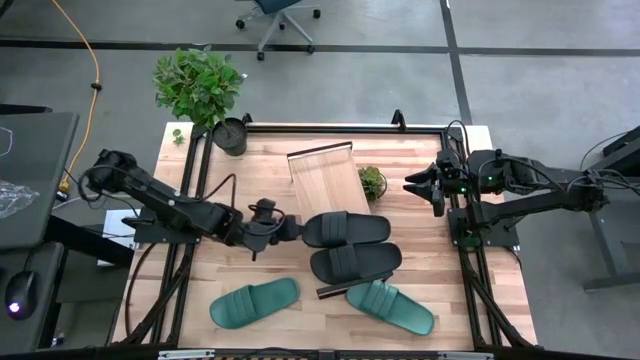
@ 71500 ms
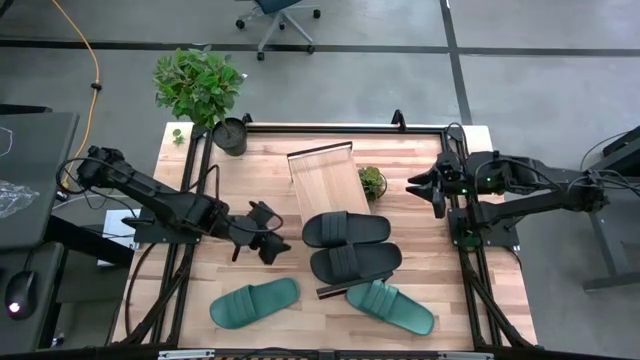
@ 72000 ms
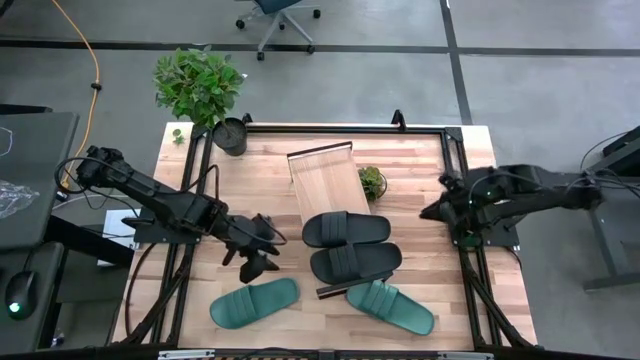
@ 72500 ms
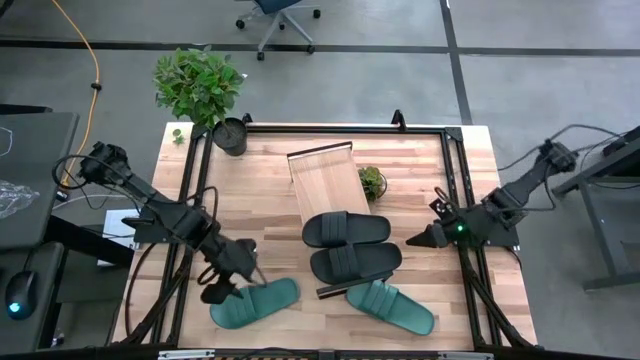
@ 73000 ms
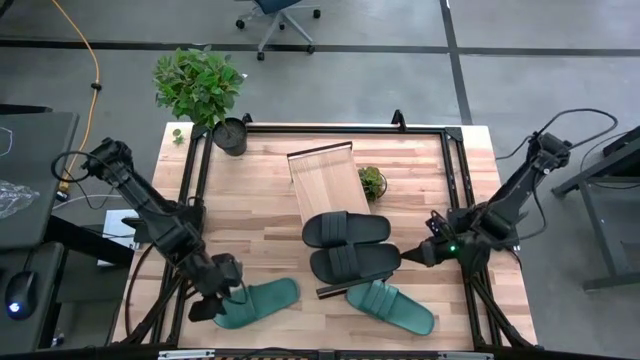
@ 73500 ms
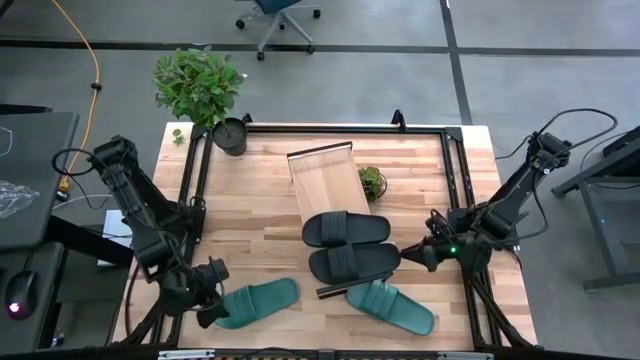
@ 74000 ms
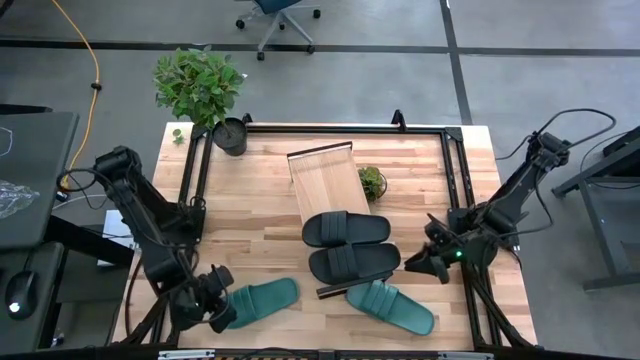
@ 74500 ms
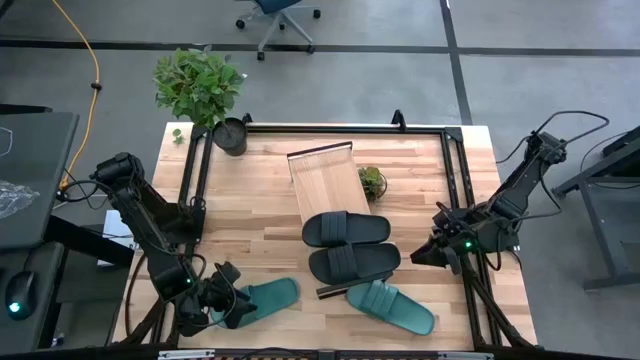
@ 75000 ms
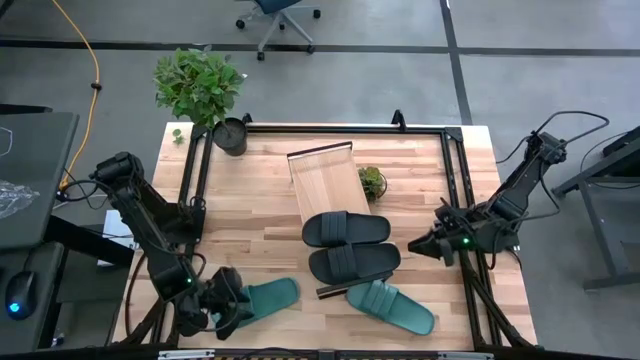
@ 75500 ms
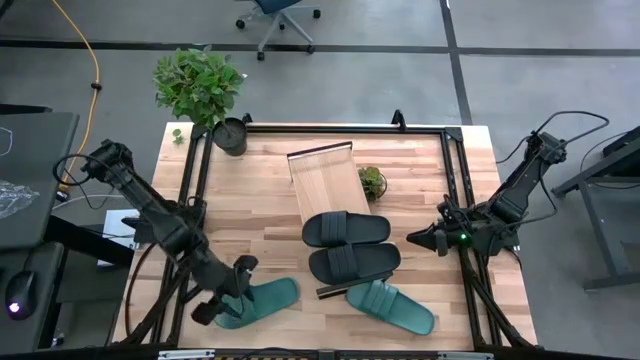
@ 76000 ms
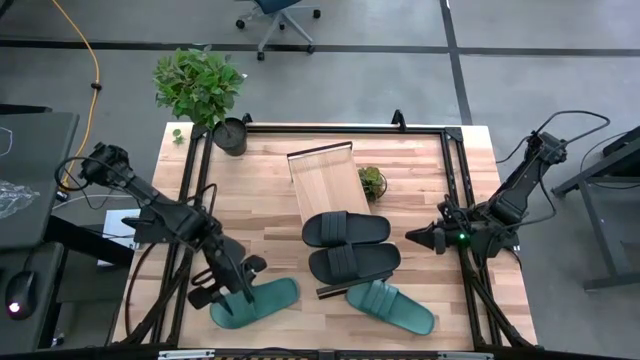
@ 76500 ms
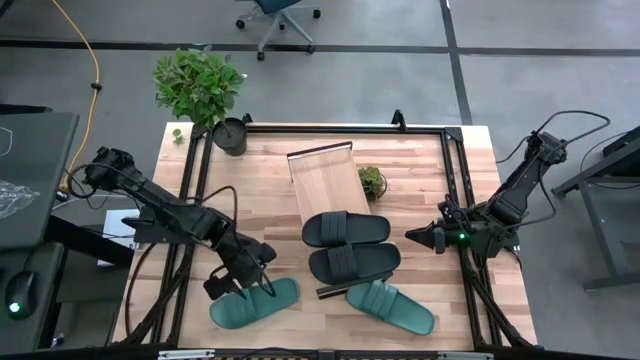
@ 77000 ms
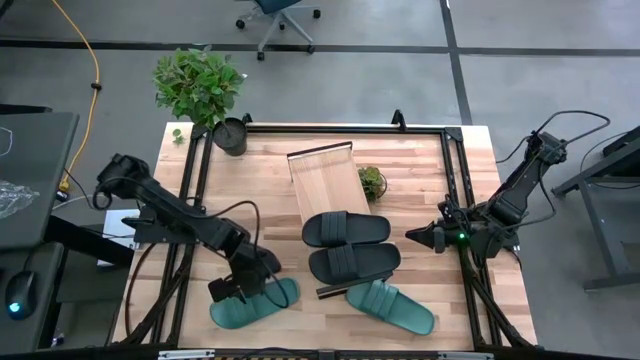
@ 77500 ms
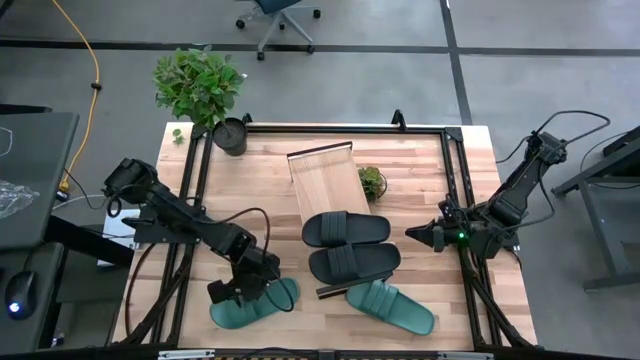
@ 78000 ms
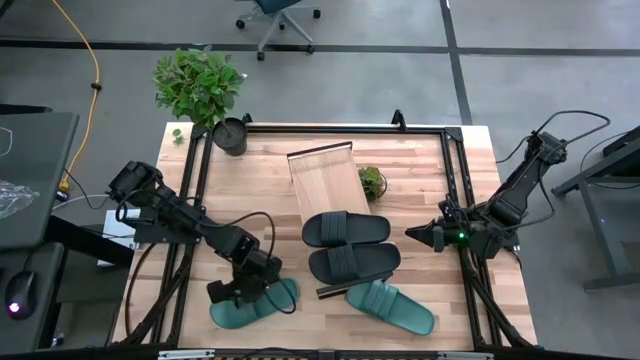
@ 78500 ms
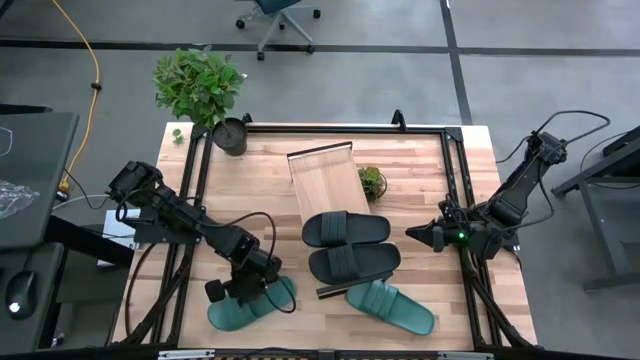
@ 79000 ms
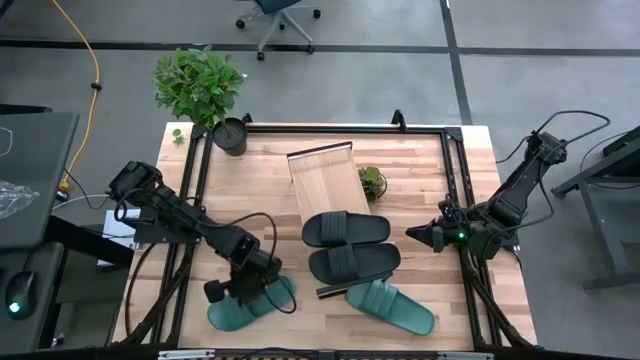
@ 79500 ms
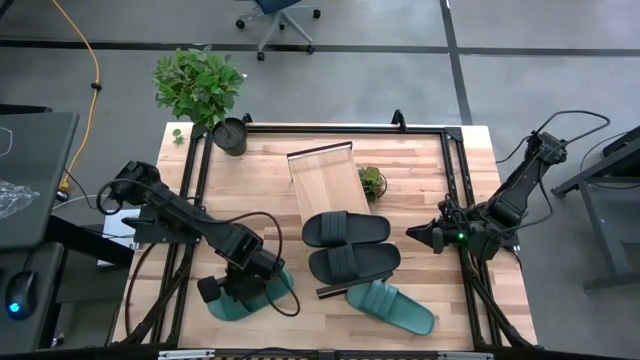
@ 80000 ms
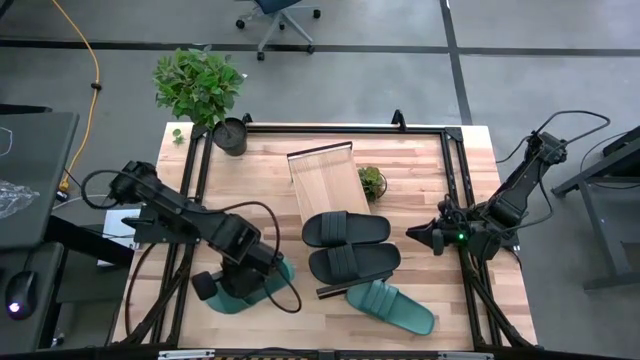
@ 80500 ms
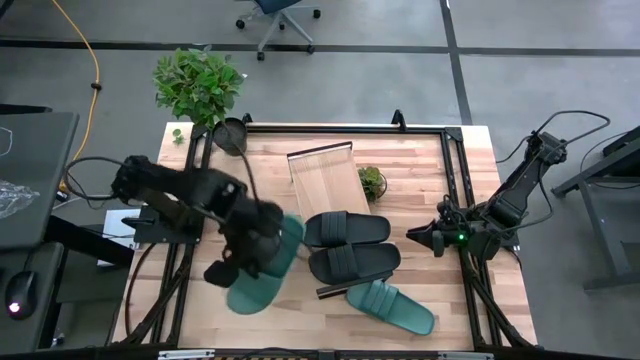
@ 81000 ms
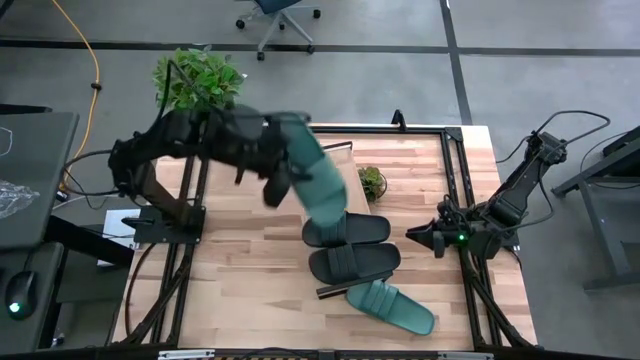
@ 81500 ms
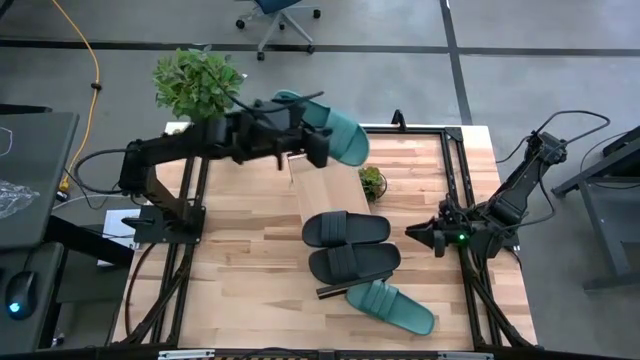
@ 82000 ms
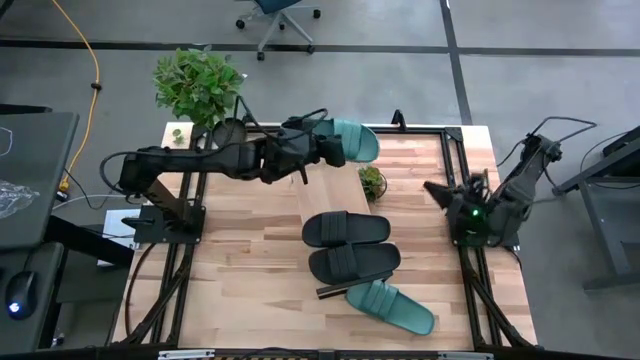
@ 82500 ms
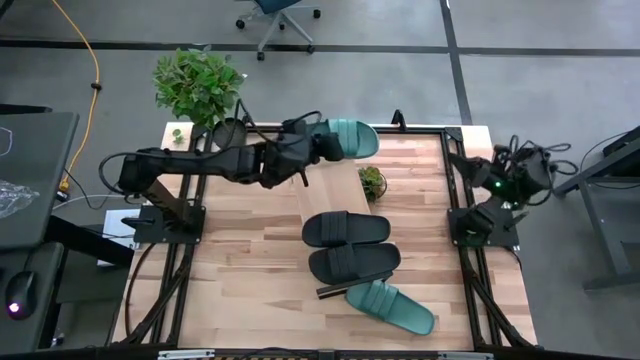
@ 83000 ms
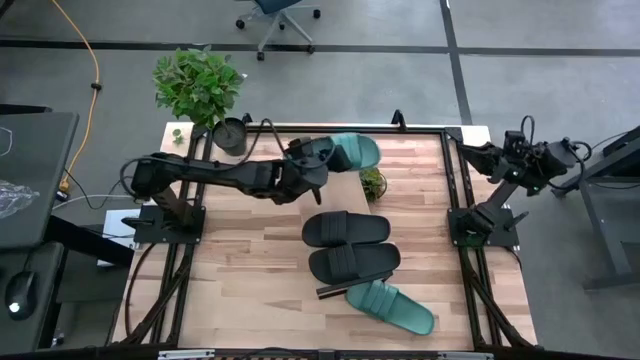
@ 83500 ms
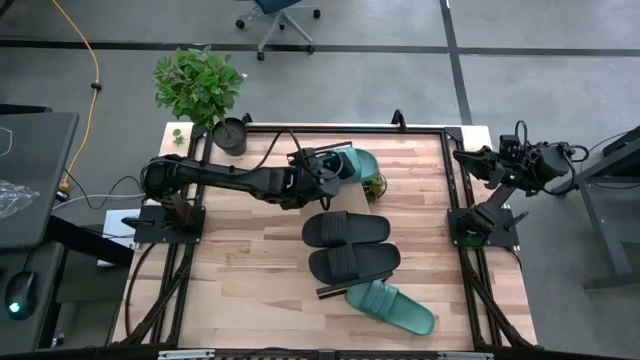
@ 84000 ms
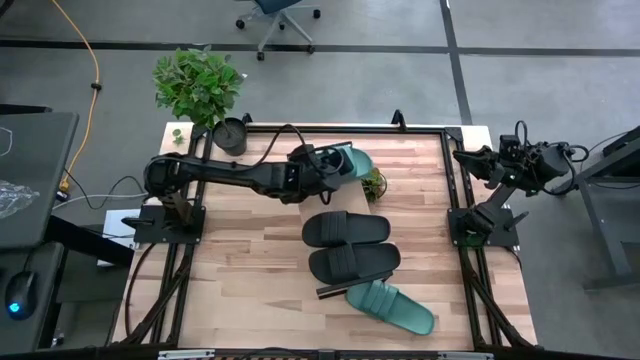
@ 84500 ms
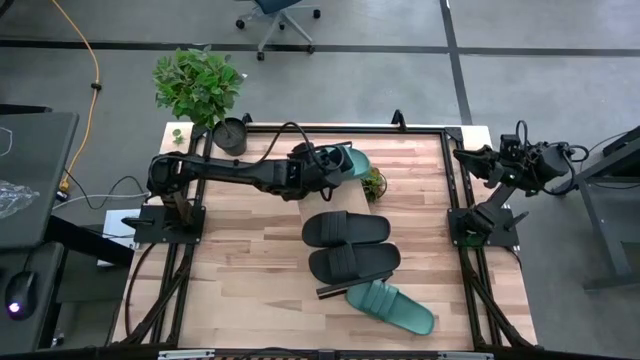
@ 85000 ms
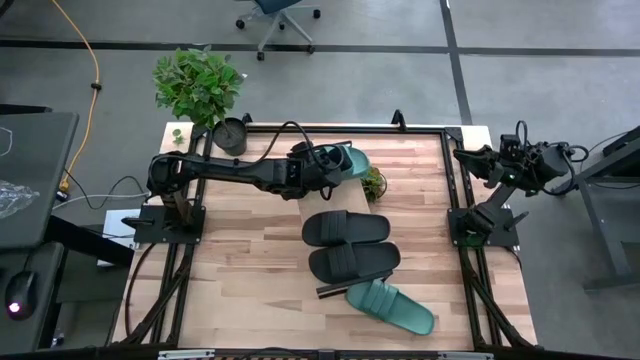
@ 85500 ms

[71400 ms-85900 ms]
Task: Pick and place slides into the shelf
Put the left green slipper on the shelf

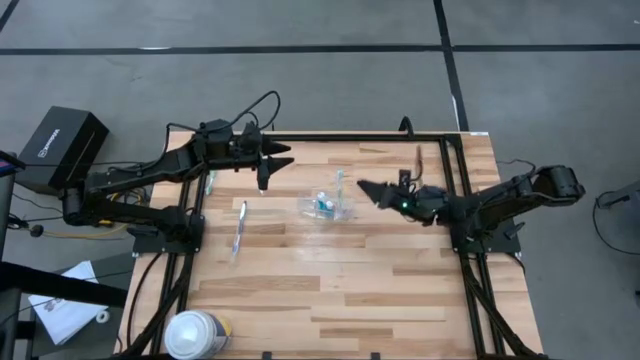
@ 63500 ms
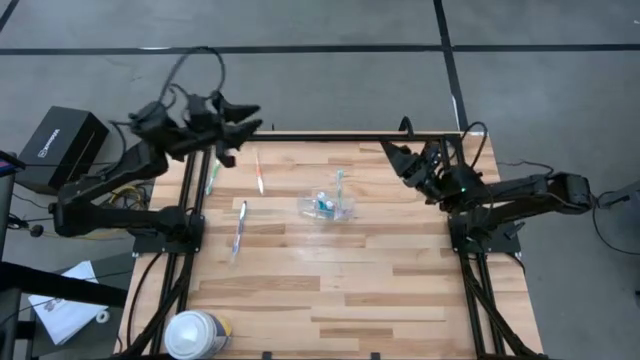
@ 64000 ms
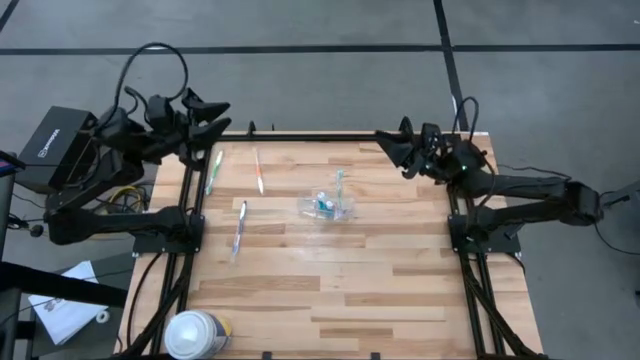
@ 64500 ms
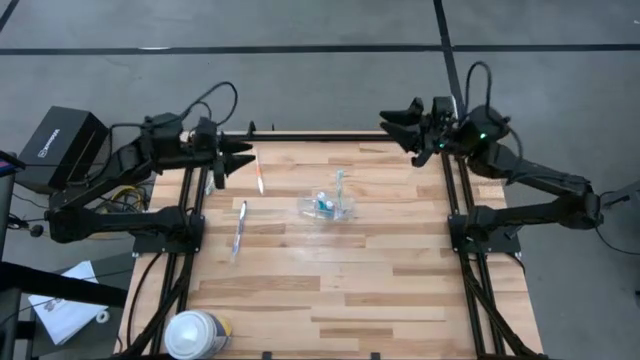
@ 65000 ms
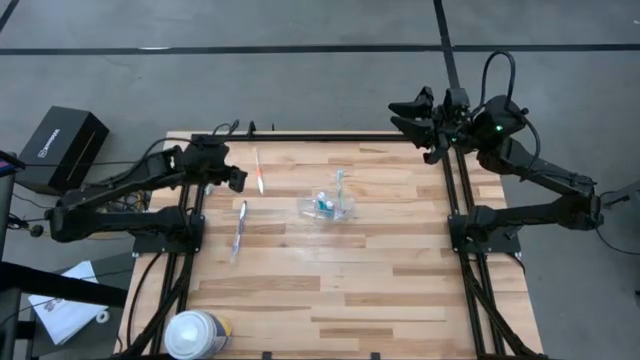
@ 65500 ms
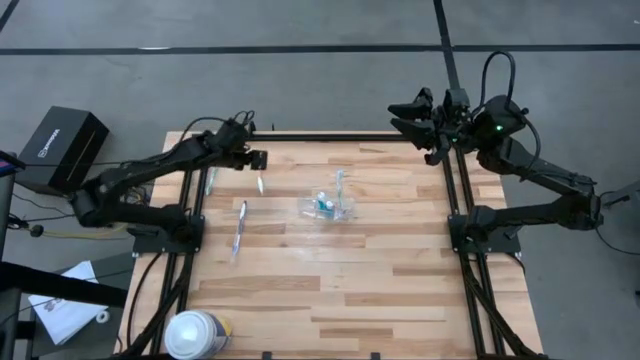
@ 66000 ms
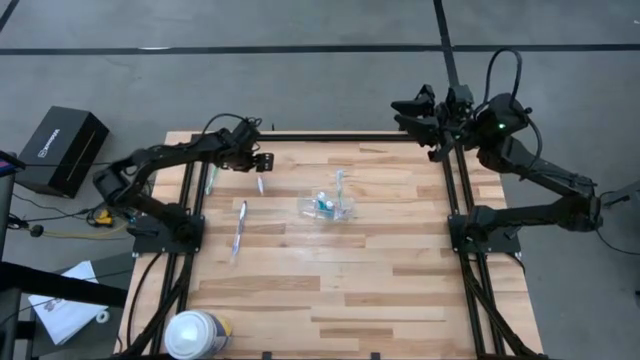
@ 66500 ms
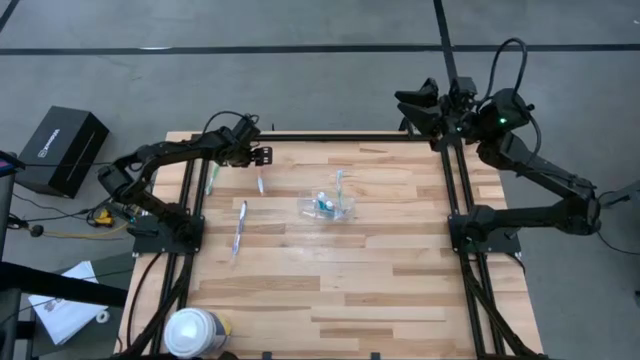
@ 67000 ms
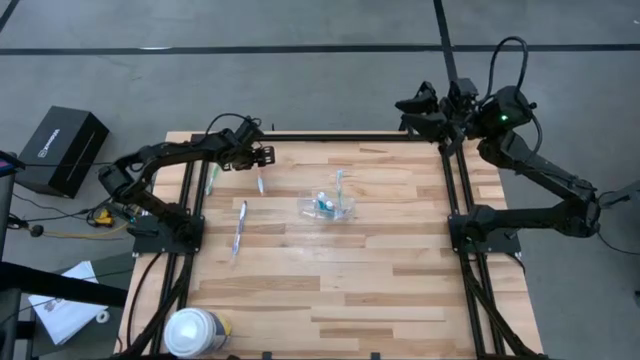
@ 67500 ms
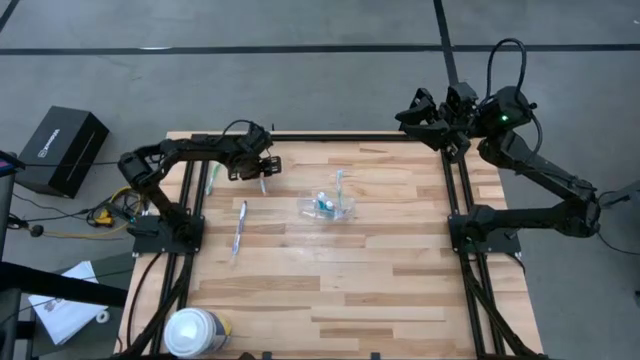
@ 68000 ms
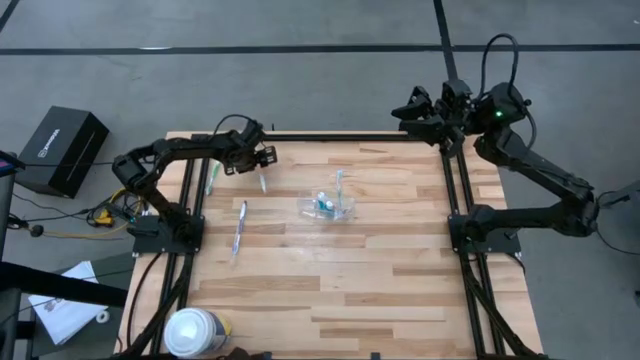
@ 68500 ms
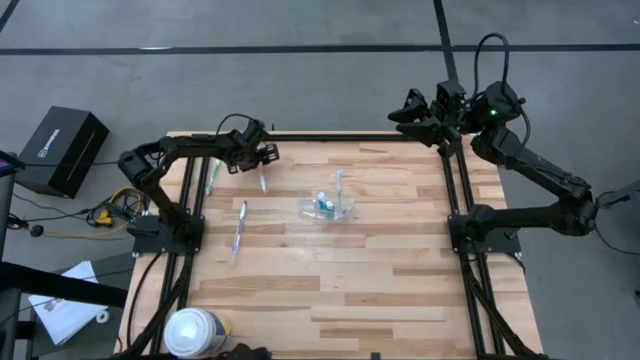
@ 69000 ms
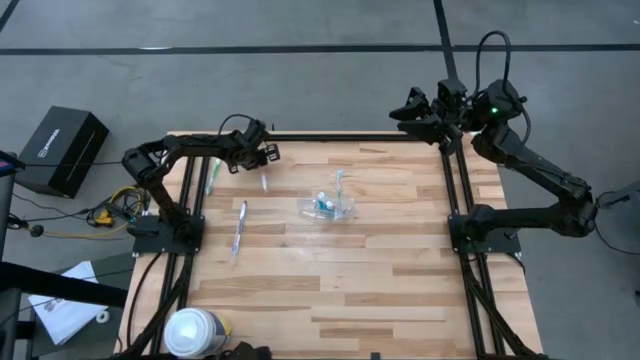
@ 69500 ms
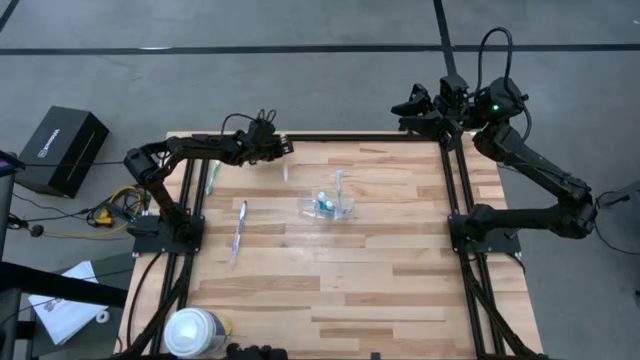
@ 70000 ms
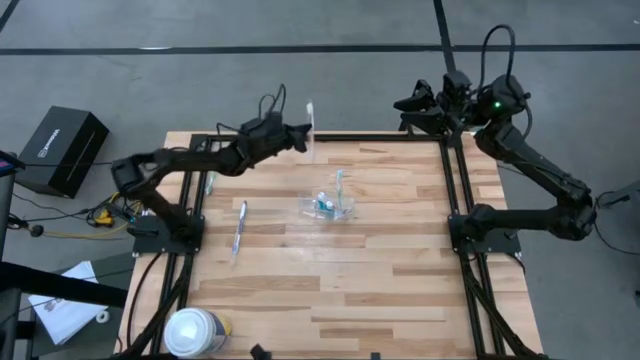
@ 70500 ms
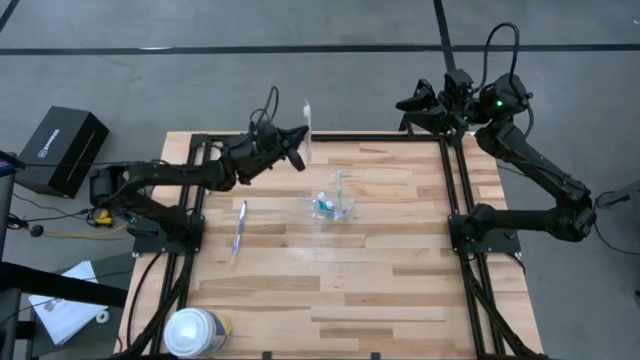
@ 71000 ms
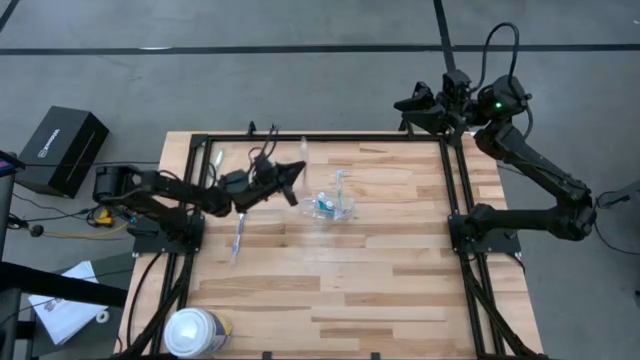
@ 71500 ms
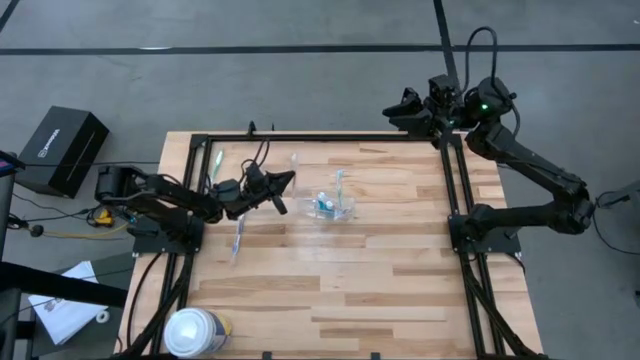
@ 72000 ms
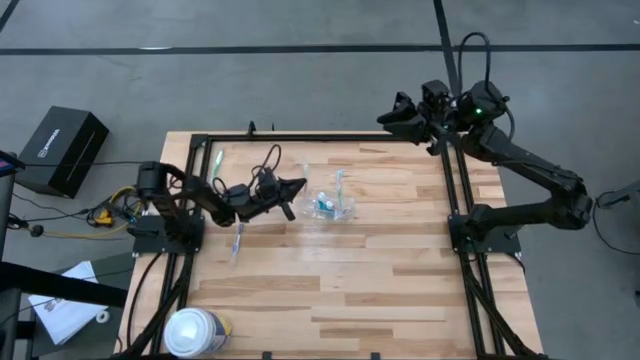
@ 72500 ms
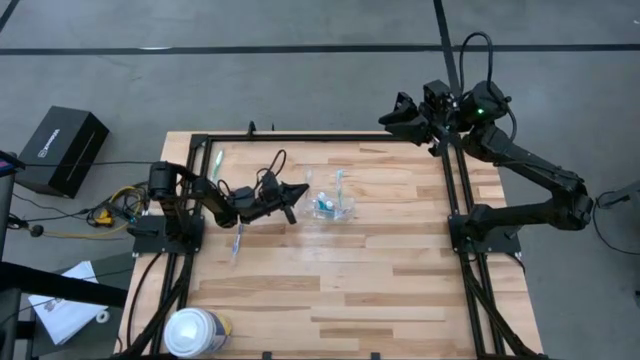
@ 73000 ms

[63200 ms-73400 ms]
Task: Pick & Place toothbrushing station
Put the orange toothbrush into the transparent organizer
